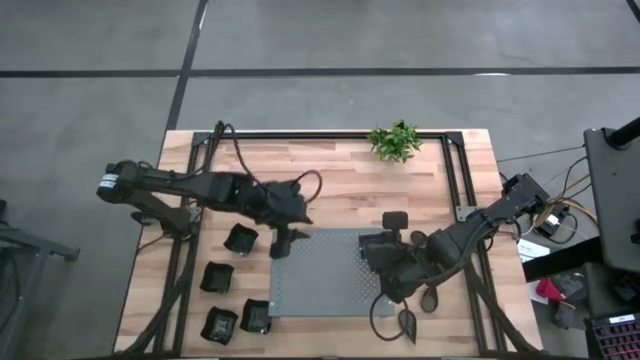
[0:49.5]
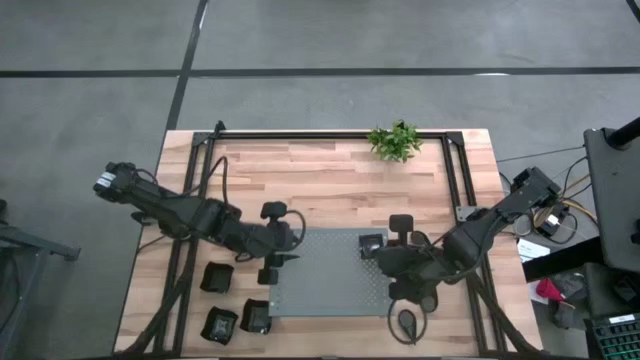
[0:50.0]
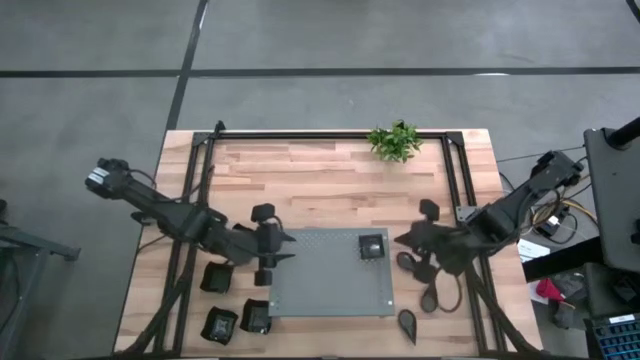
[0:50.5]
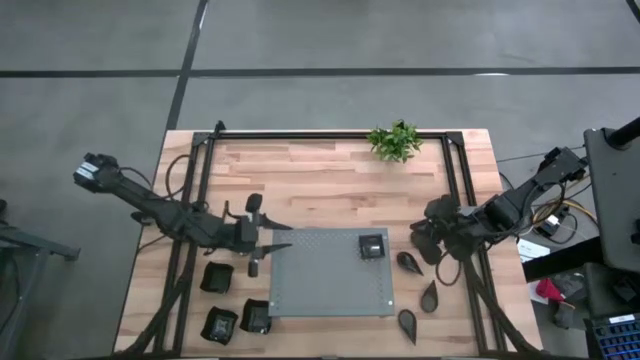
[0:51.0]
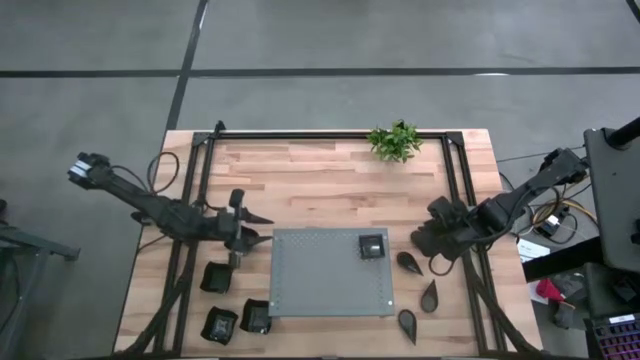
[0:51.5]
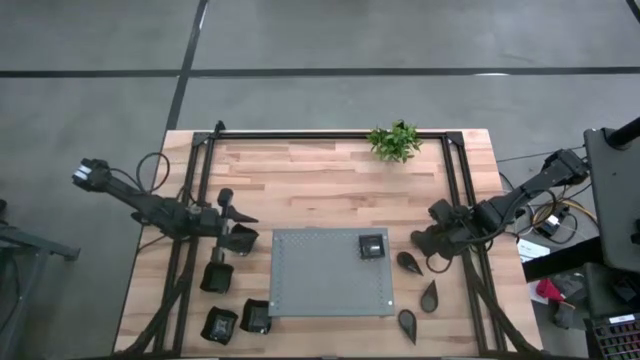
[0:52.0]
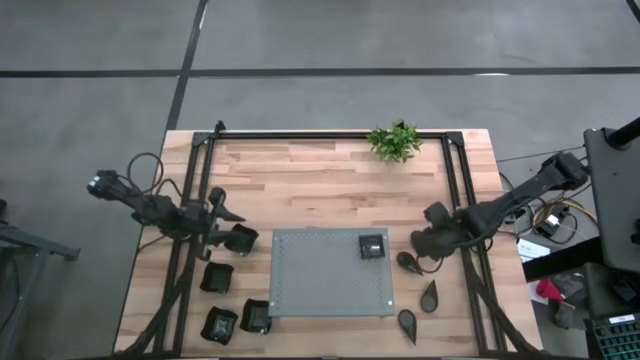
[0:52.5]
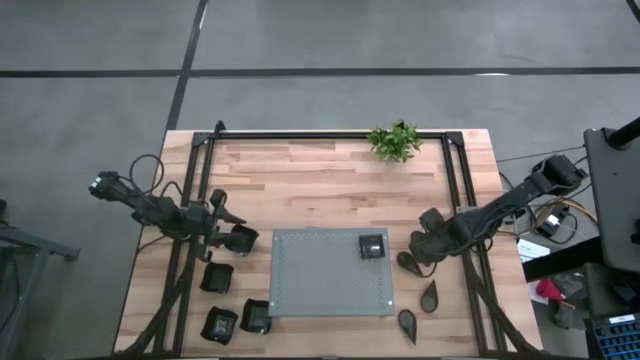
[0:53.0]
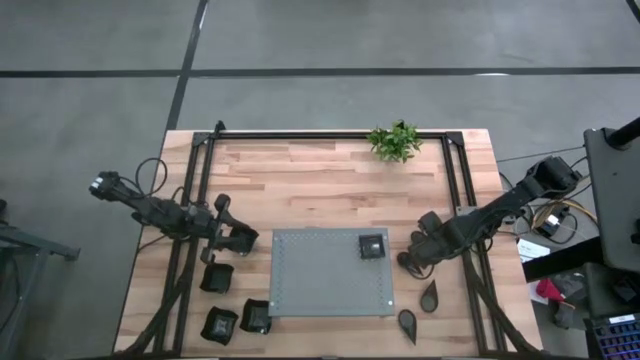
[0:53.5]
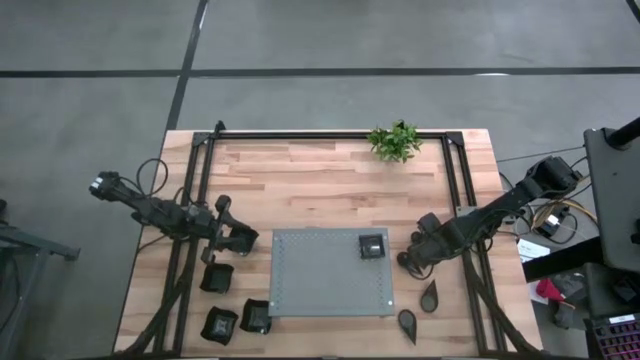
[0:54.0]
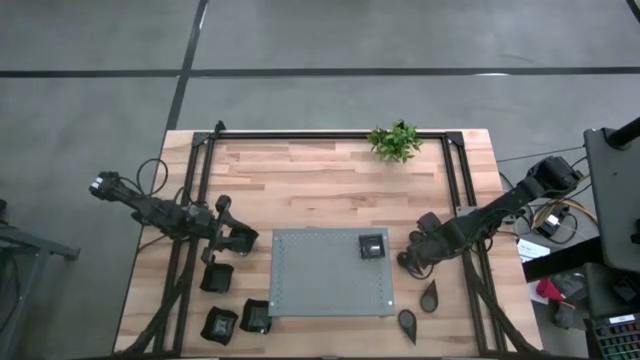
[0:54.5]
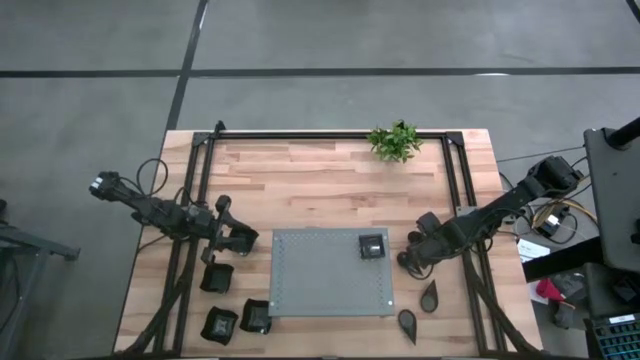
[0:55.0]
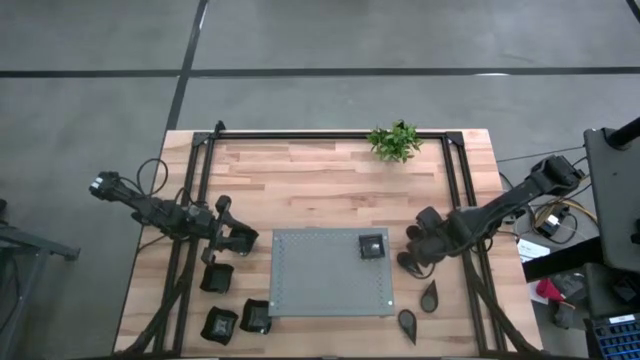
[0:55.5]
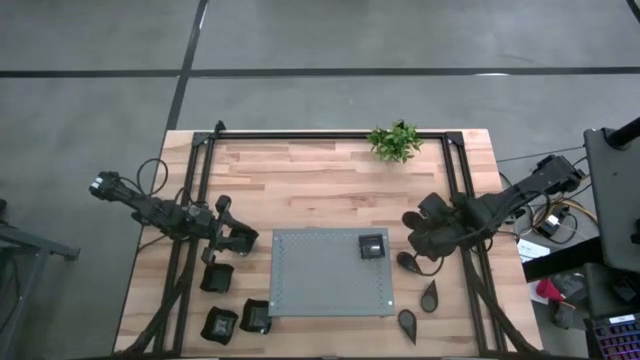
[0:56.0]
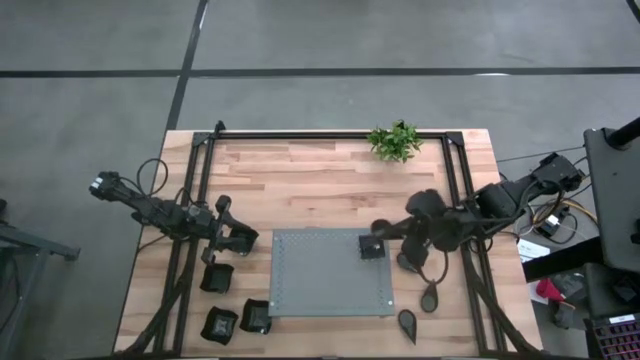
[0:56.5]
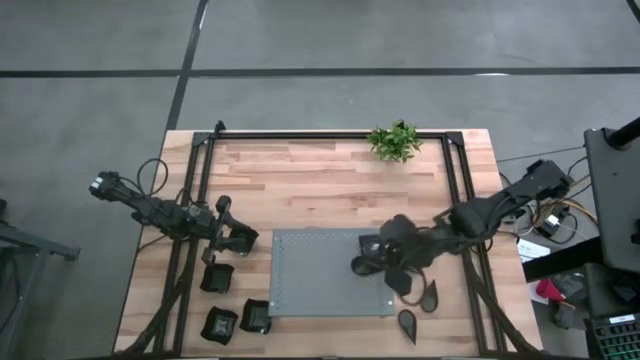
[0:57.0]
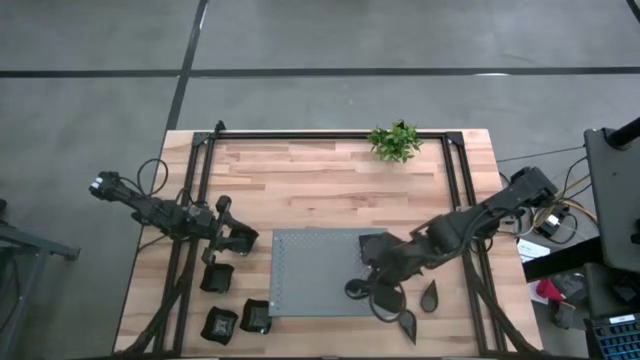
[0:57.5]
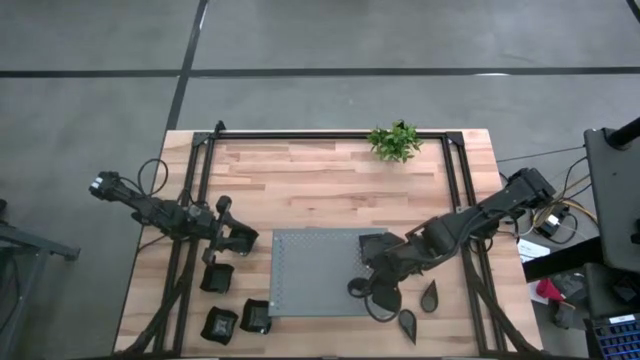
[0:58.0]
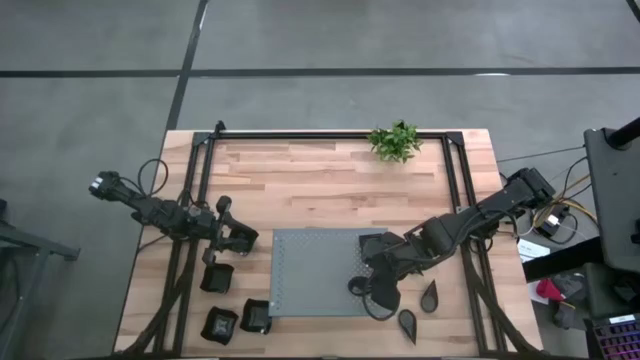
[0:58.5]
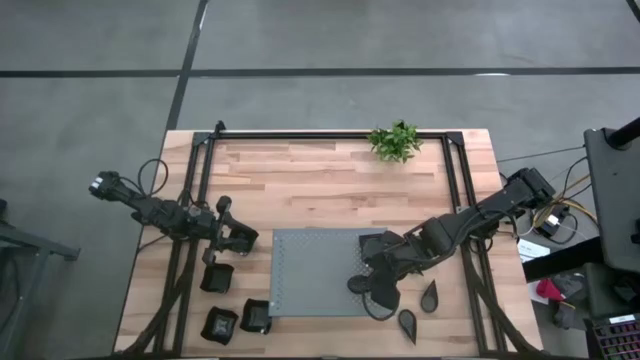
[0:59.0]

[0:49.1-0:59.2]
Task: Pick & Place Mini shaped plates
Put the drop-shaped plate on the shelf

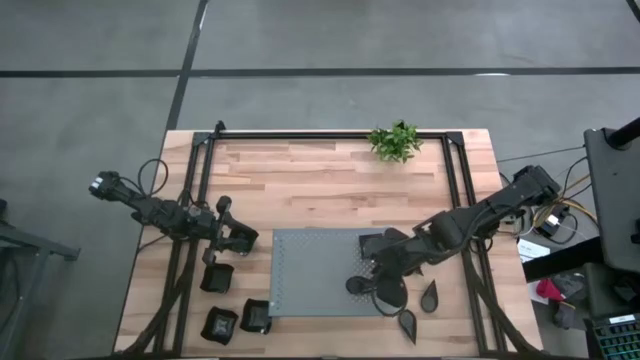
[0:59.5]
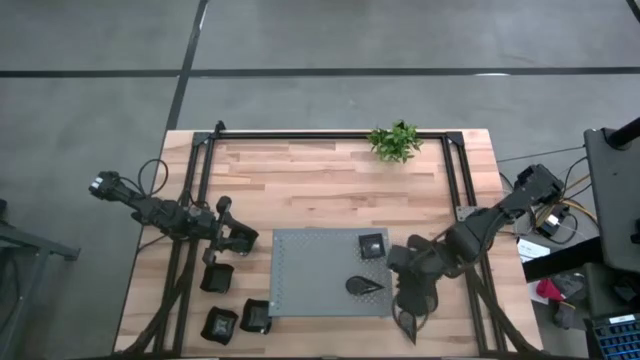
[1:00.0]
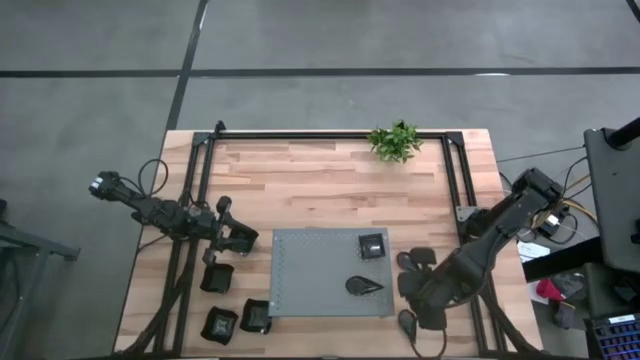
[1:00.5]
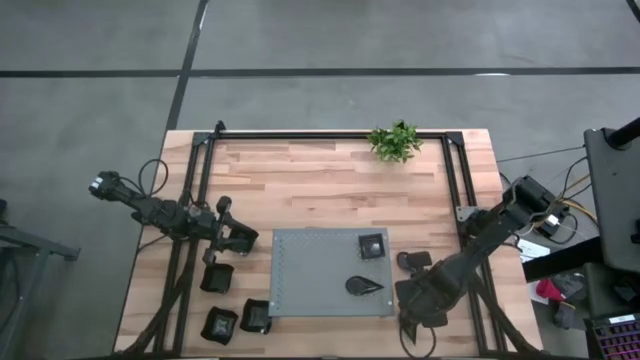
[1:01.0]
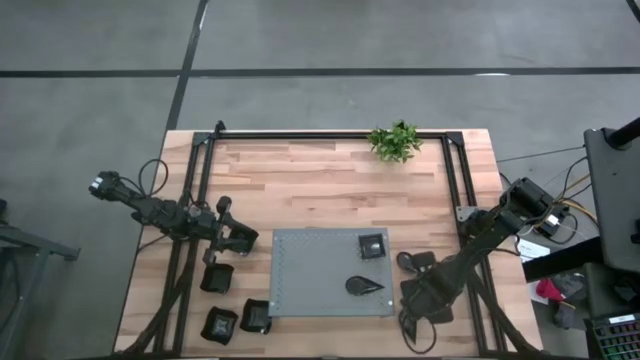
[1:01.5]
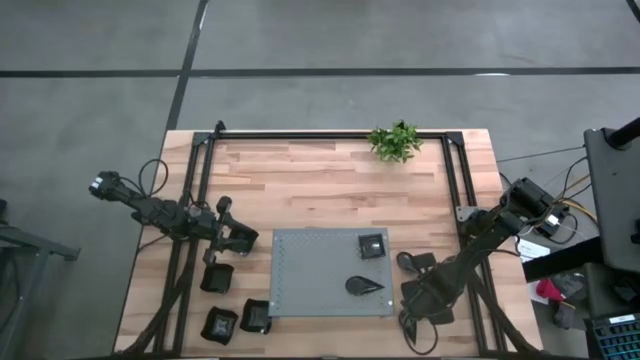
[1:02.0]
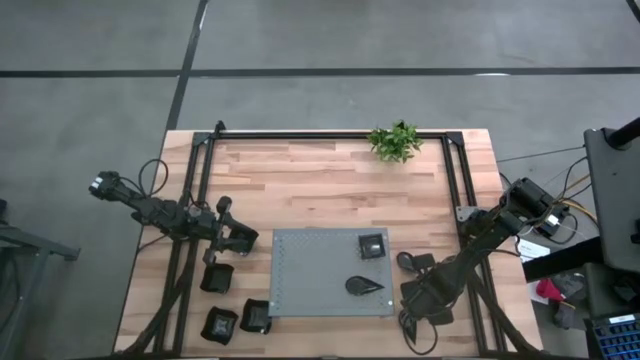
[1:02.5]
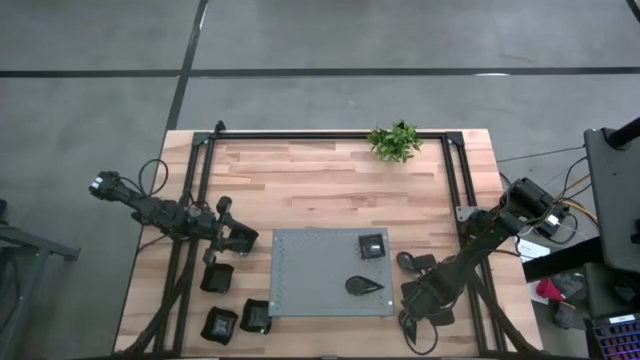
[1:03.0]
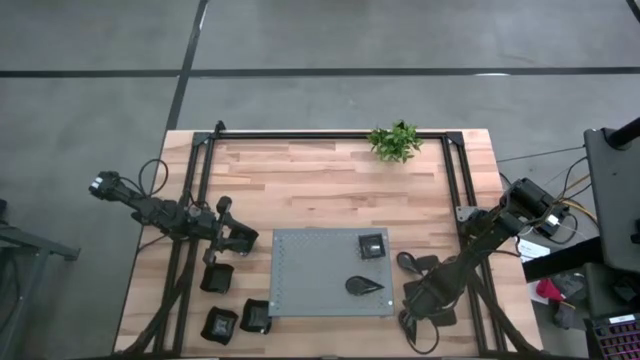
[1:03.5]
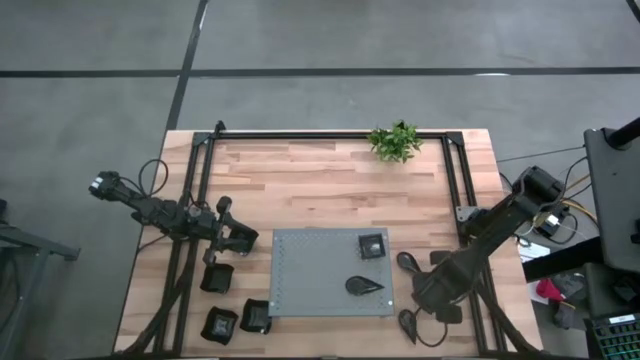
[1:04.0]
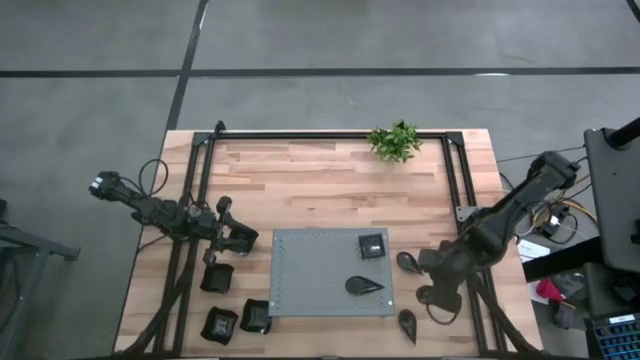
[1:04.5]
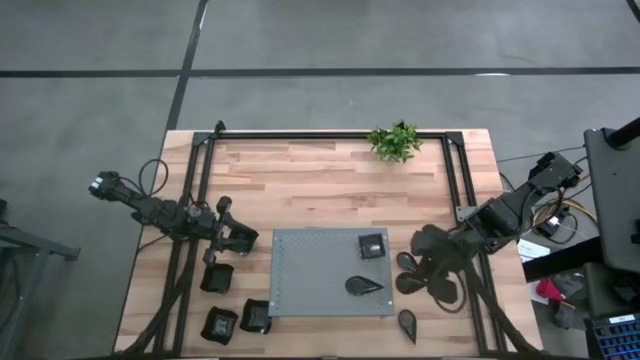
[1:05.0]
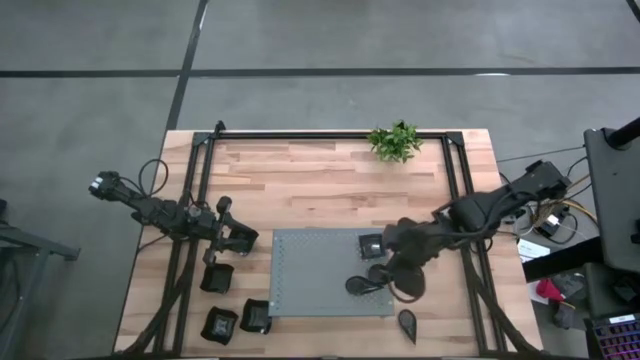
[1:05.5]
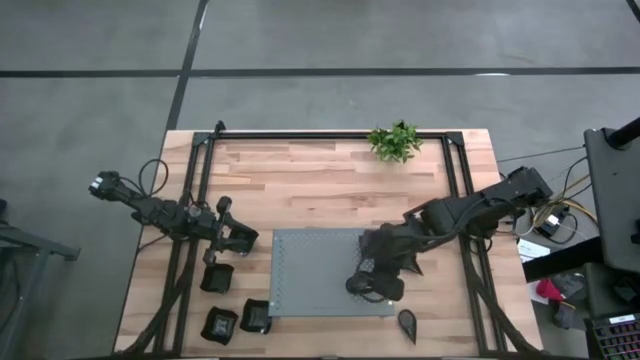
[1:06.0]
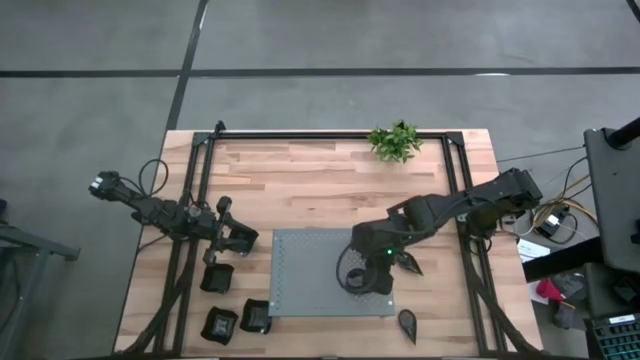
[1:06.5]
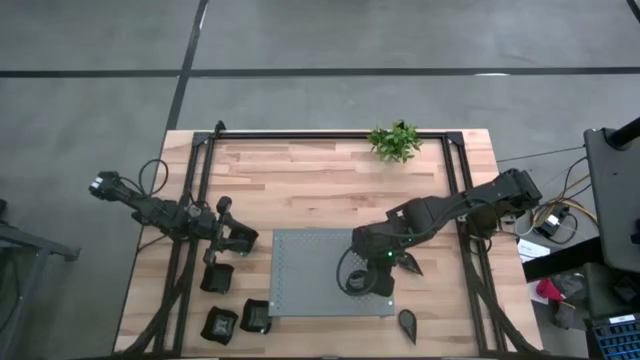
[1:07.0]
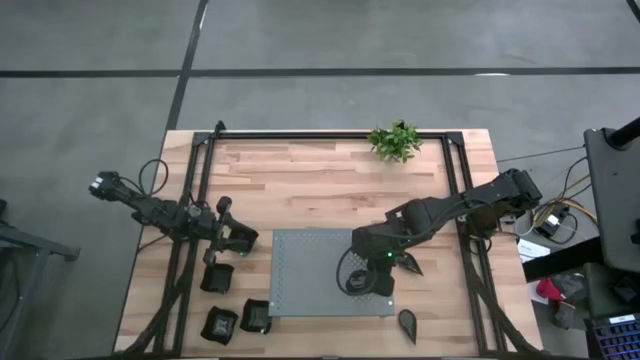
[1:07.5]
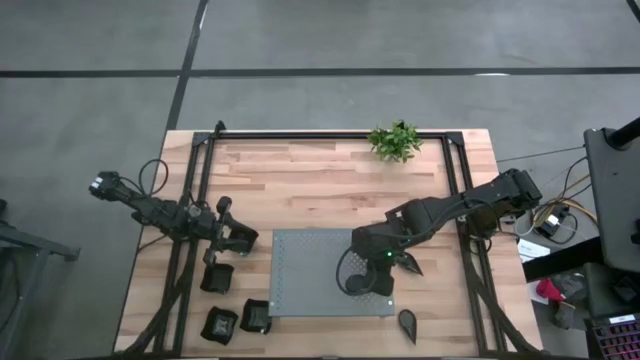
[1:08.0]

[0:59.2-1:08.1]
Stack the drop-shaped plate on top of the drop-shaped plate on the shelf

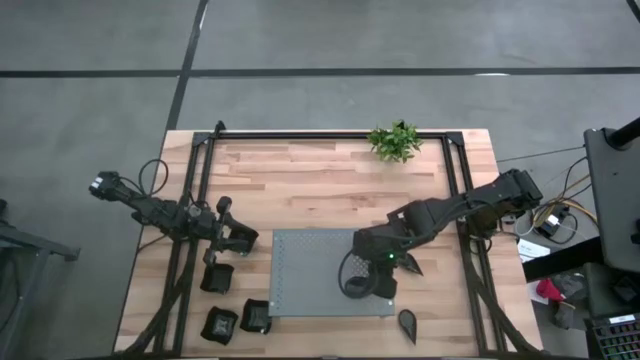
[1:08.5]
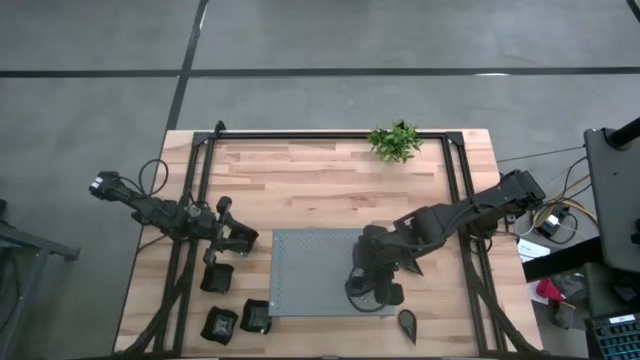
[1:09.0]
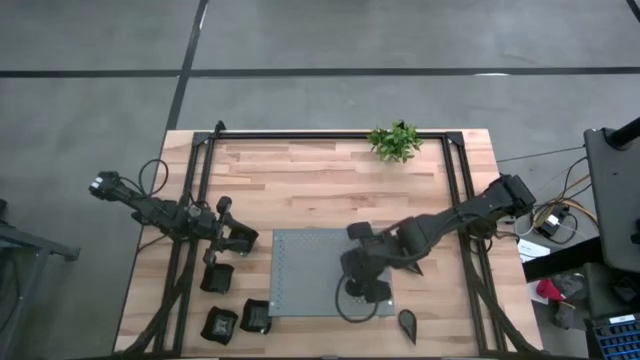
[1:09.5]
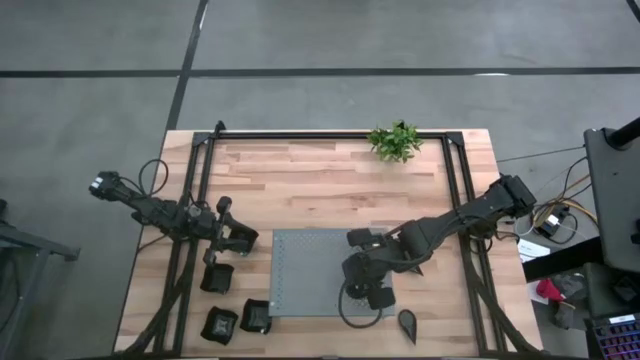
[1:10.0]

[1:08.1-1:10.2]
Adjust the drop-shaped plate on the shelf

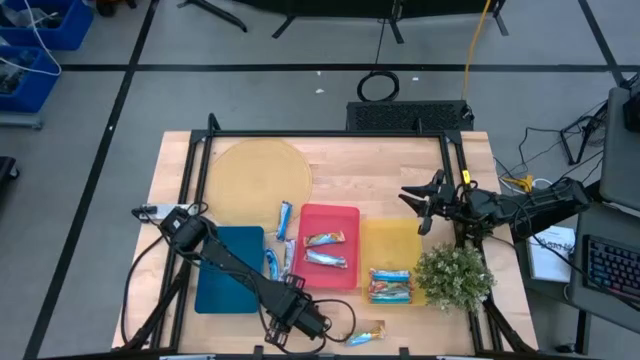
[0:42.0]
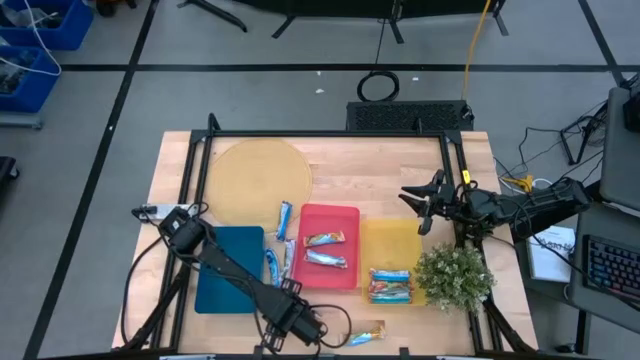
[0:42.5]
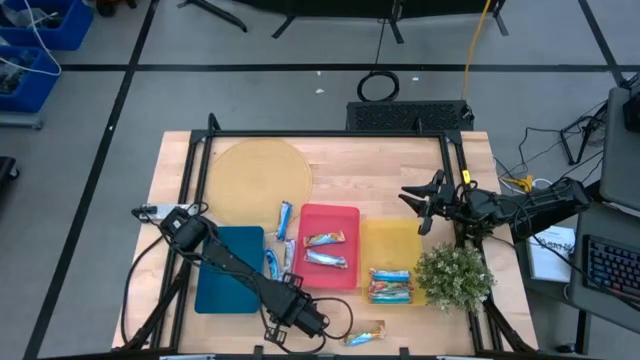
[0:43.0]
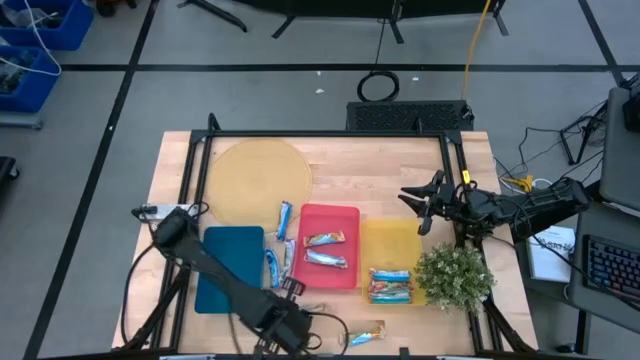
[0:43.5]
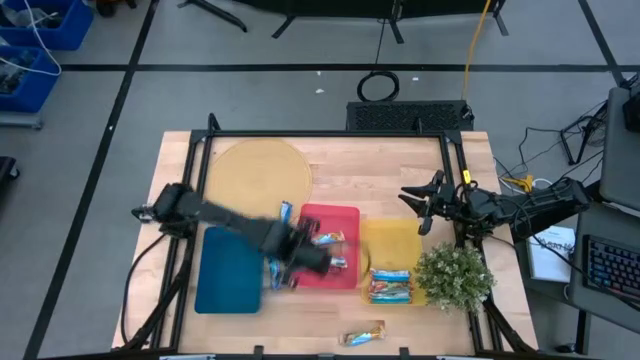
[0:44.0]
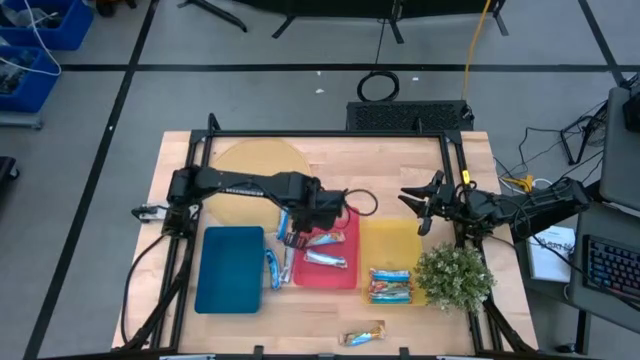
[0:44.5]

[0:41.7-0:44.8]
Task: Pick and place Granola Bars by type
Put the yellow granola bar into the red bin
